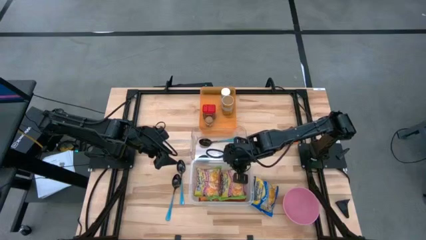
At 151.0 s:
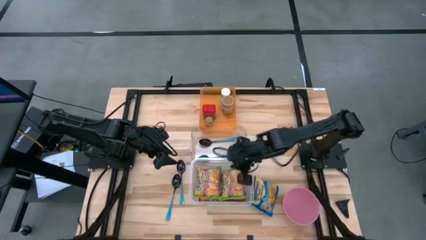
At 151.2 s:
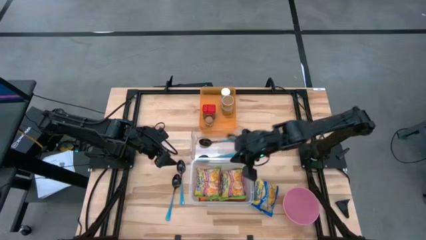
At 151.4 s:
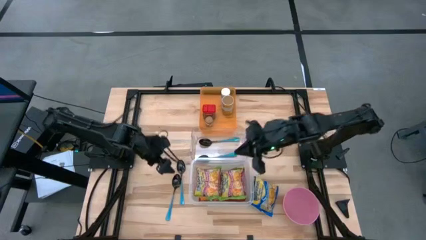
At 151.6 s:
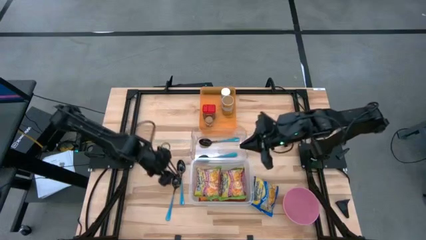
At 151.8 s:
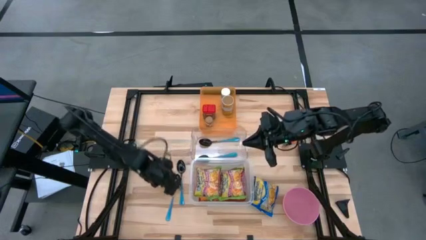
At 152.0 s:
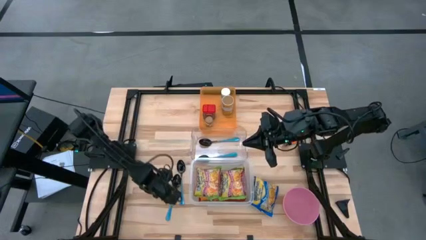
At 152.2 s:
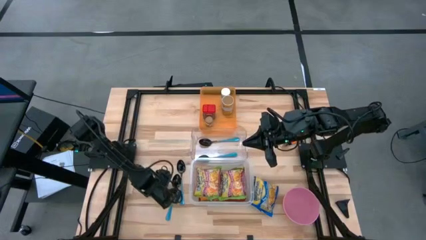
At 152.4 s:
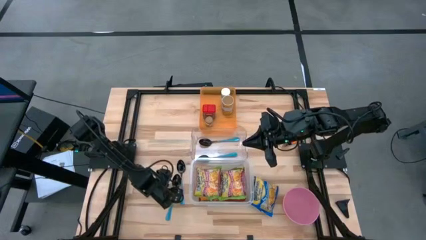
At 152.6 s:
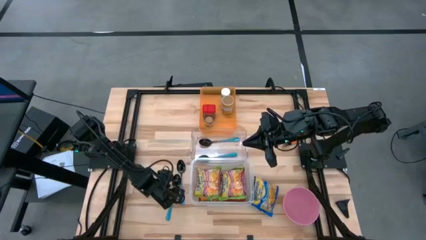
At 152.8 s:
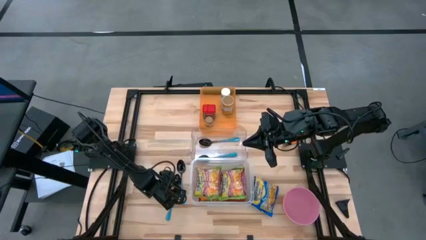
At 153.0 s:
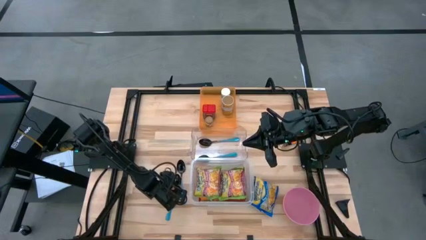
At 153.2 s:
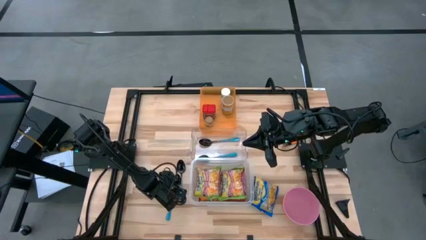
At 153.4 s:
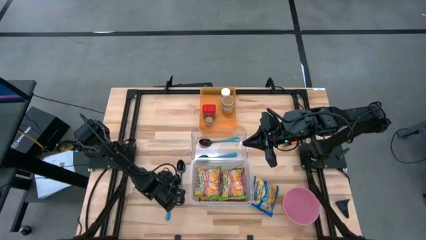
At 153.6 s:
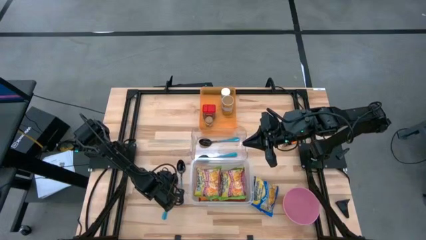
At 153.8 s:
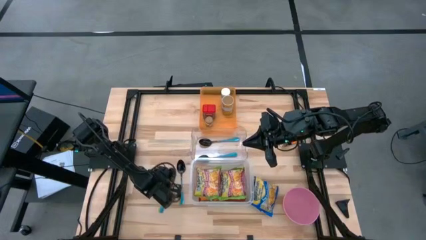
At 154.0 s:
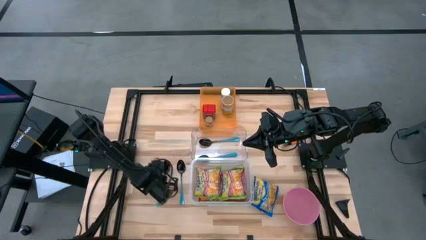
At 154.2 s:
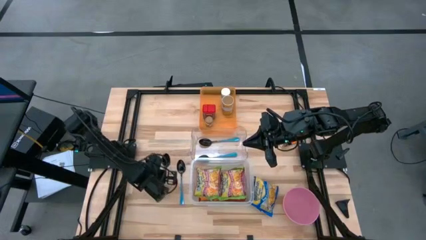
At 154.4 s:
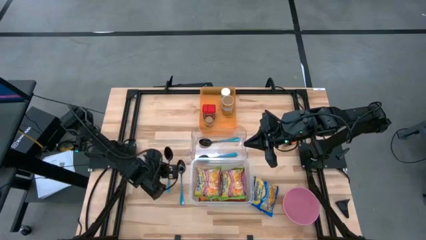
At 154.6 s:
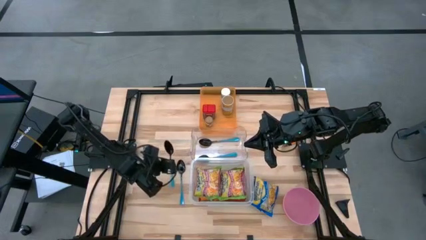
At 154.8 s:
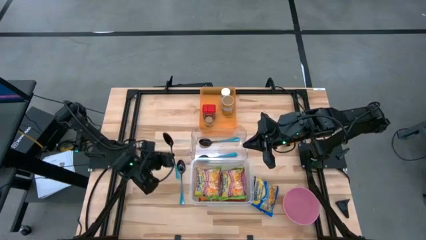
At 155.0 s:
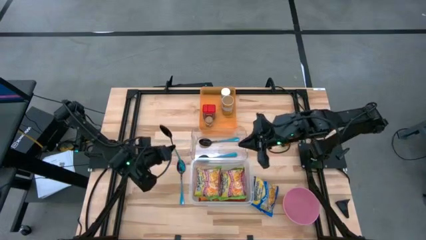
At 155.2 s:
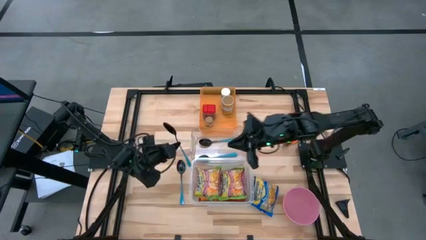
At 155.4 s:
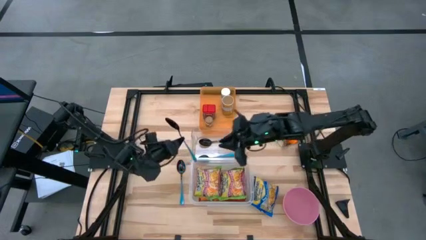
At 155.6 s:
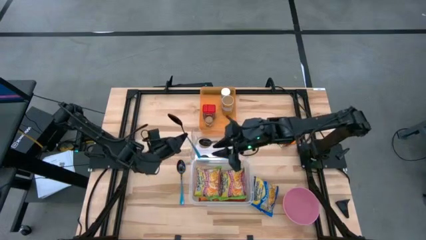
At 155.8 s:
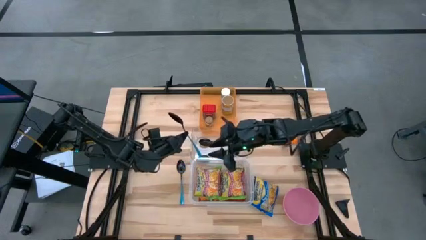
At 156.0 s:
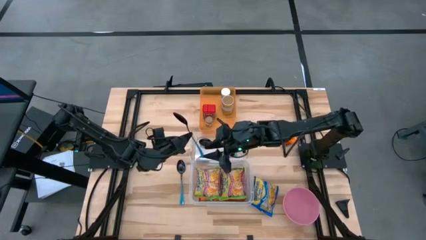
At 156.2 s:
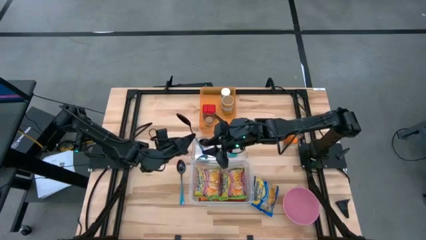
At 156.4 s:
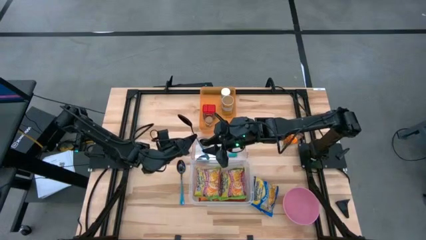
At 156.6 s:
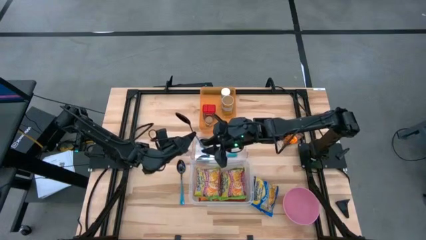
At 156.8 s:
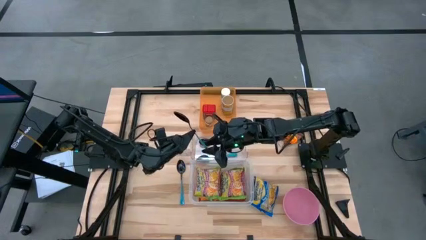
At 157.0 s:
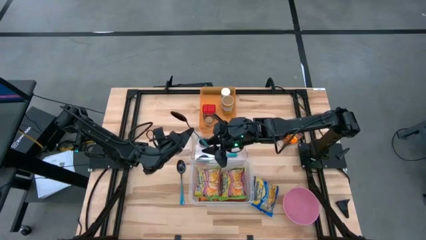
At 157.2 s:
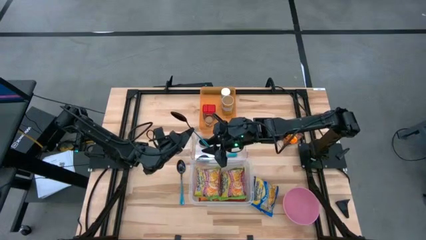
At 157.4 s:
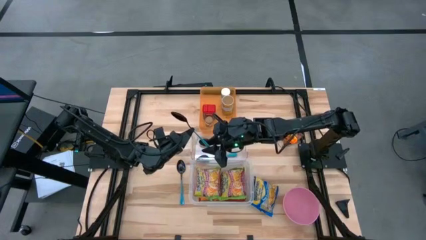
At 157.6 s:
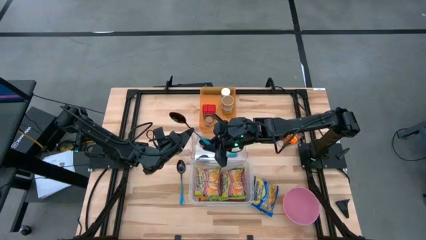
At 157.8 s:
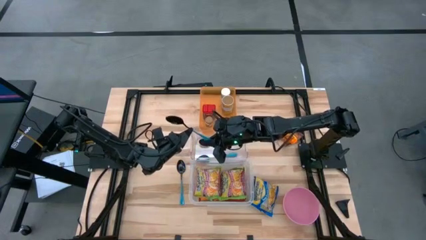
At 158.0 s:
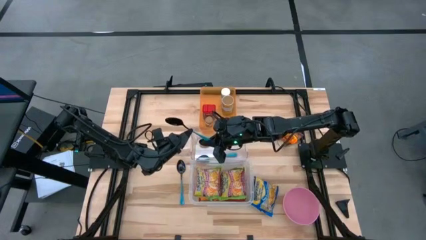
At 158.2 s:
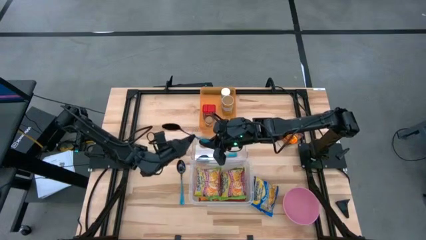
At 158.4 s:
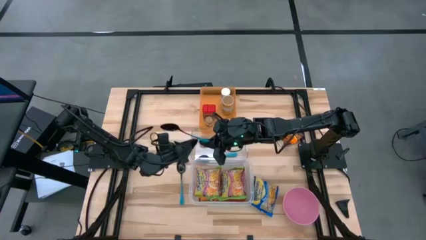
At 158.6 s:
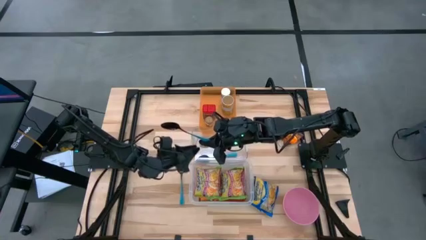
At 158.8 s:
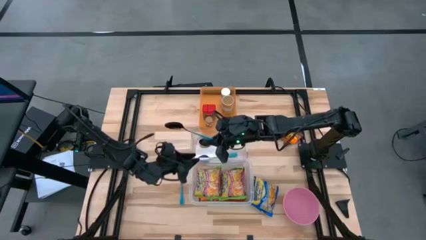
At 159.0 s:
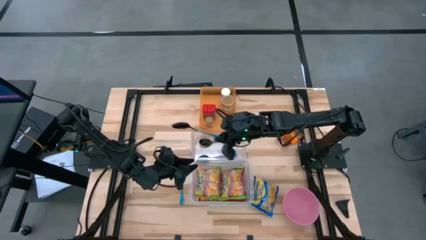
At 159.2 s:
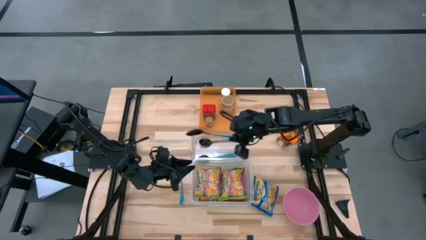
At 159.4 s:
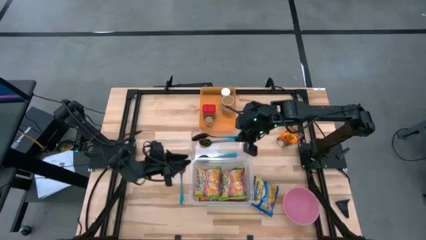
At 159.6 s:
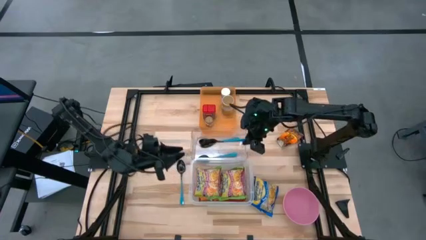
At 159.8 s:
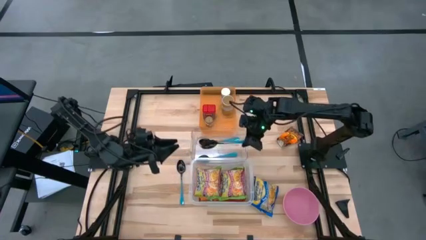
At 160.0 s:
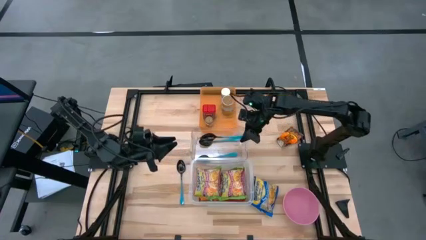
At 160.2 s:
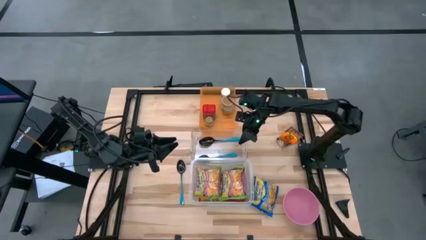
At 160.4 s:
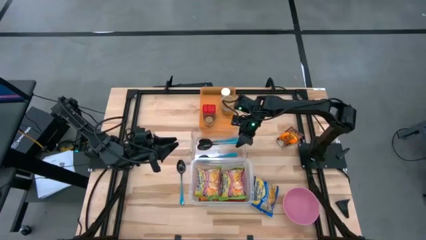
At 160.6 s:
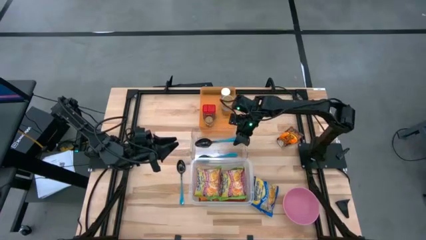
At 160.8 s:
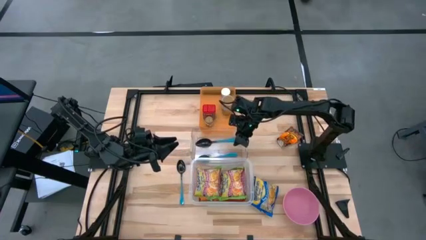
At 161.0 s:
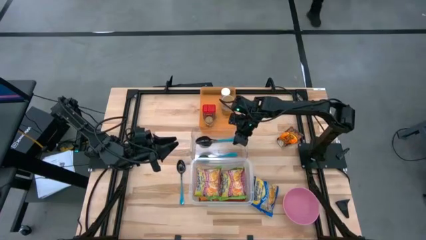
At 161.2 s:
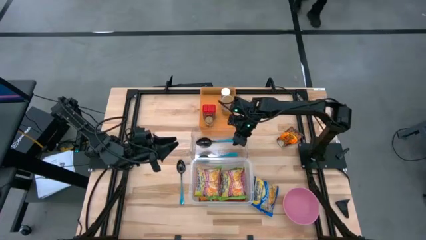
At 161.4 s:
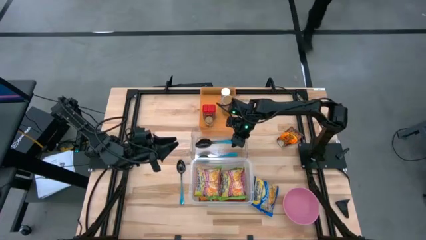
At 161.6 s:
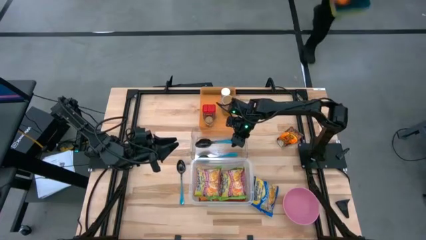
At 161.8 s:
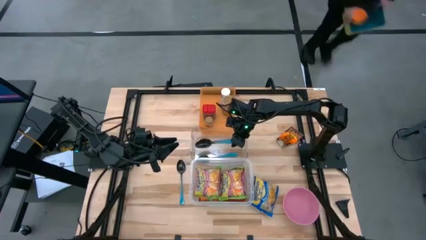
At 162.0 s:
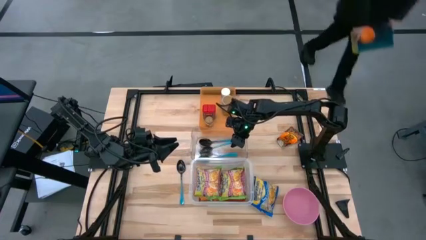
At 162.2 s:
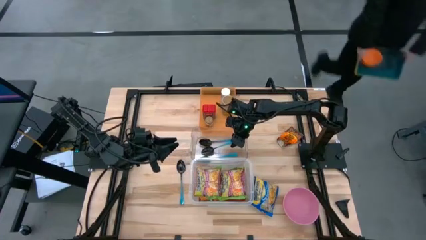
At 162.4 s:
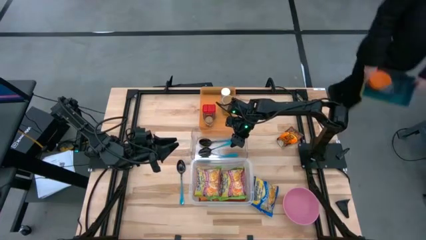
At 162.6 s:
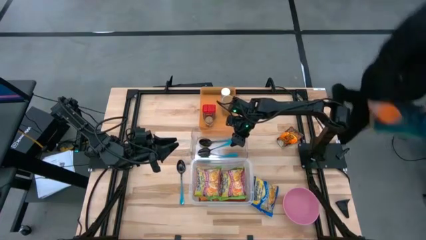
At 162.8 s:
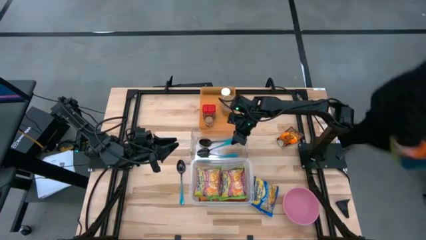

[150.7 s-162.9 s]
Task: Pick & Place Food Item
Put the blue spoon into the transparent bin

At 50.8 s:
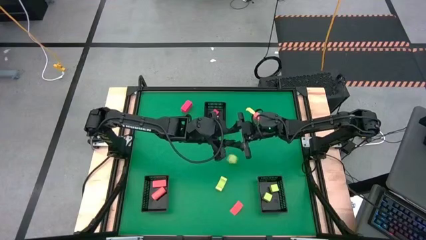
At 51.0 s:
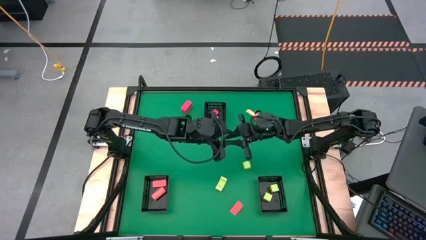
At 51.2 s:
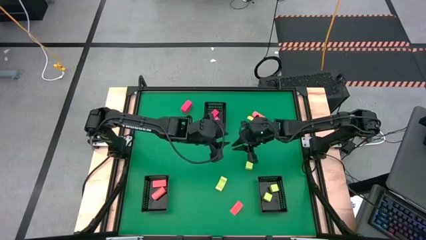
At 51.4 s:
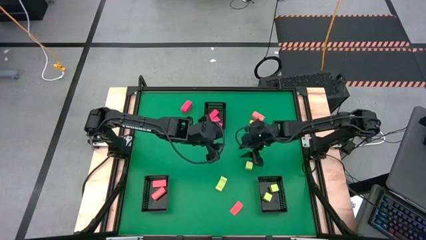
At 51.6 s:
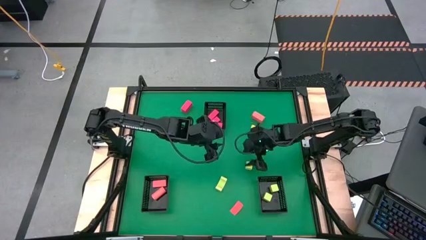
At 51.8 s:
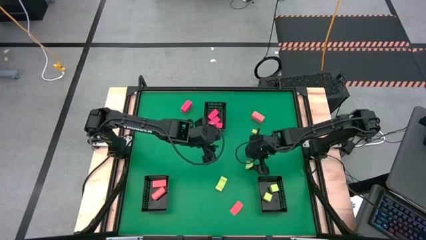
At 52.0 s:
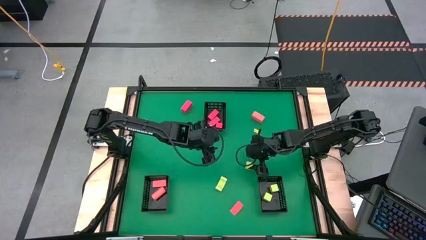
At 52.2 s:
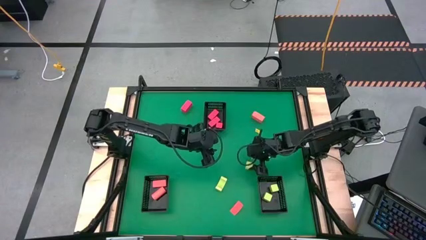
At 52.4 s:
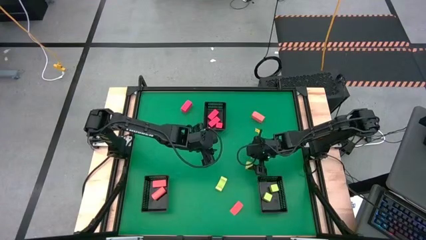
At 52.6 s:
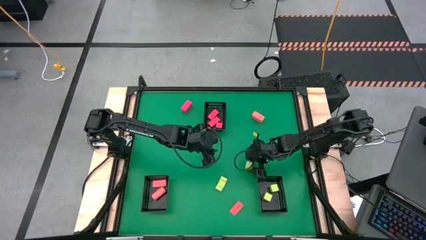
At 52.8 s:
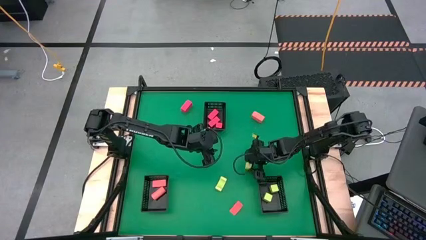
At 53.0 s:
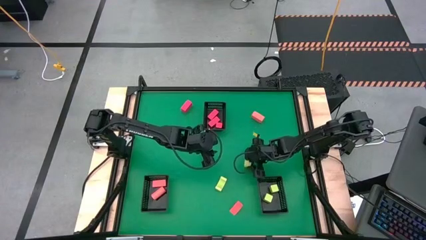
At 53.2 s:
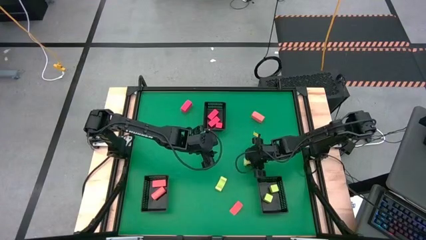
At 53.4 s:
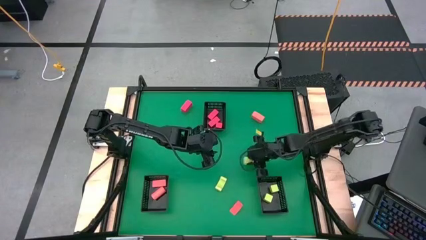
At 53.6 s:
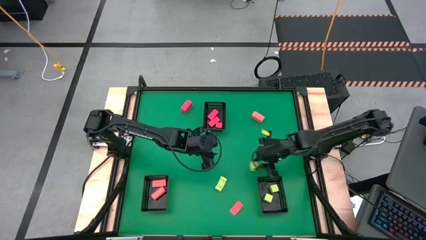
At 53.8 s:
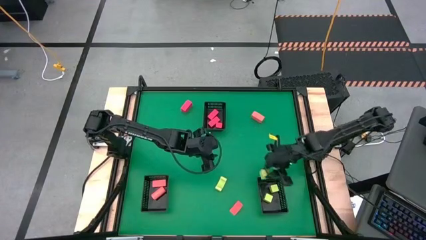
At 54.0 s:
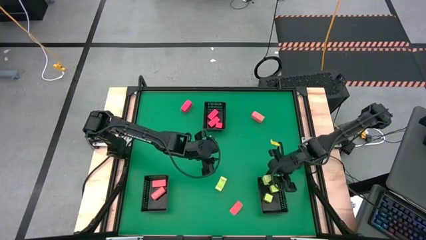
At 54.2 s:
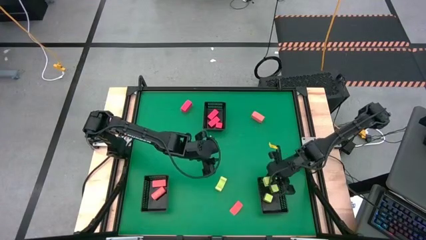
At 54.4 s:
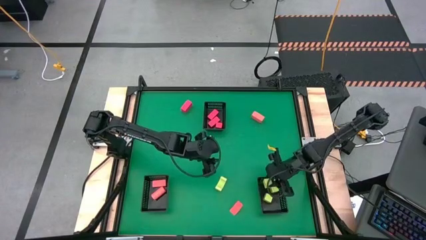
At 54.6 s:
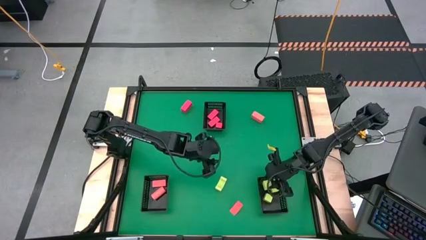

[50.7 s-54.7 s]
Task: Sort & place blocks by color
Put the green block into the bottom right black bin
